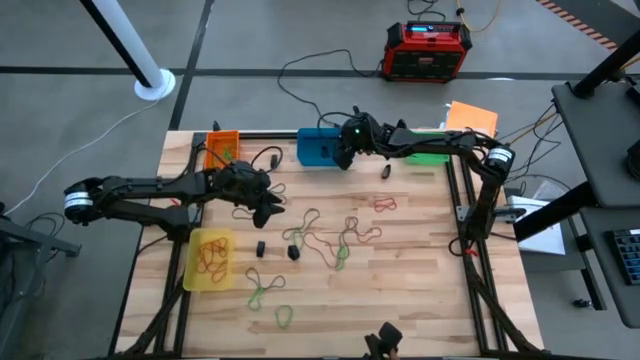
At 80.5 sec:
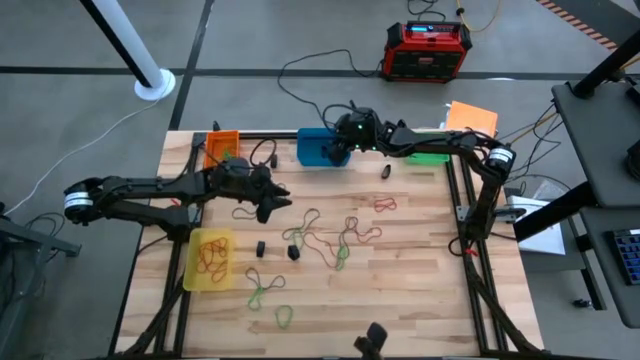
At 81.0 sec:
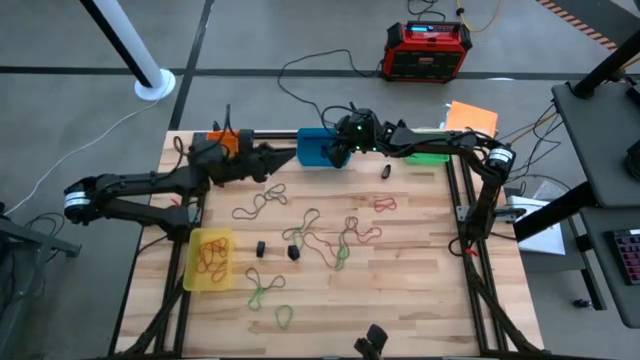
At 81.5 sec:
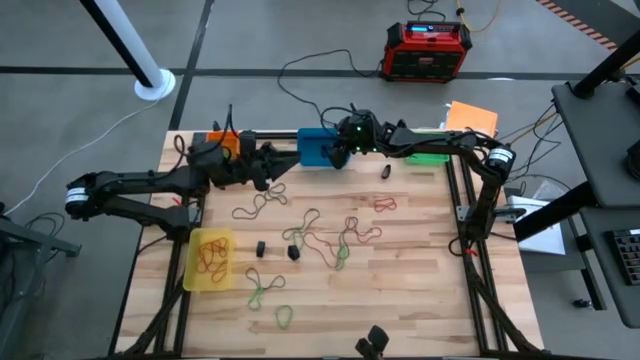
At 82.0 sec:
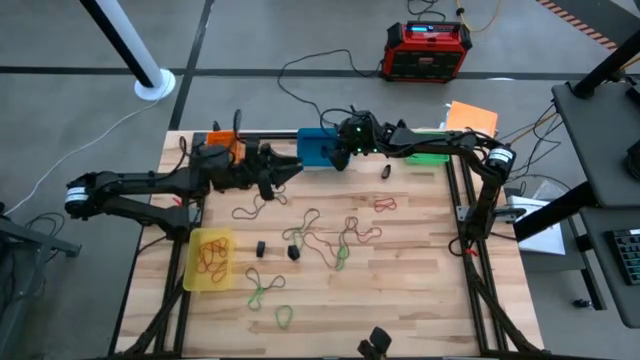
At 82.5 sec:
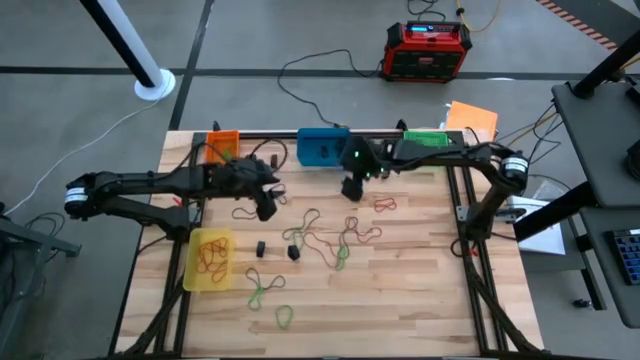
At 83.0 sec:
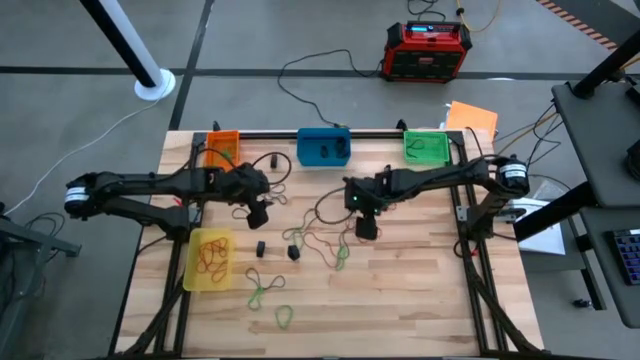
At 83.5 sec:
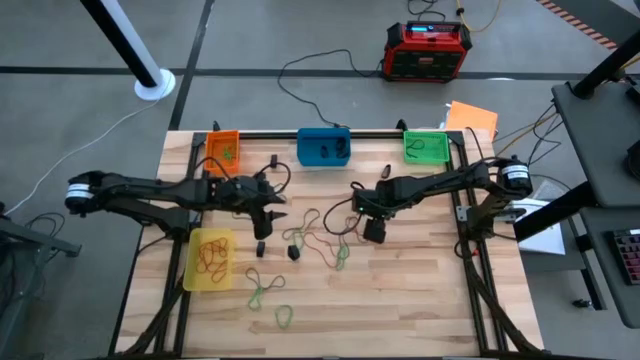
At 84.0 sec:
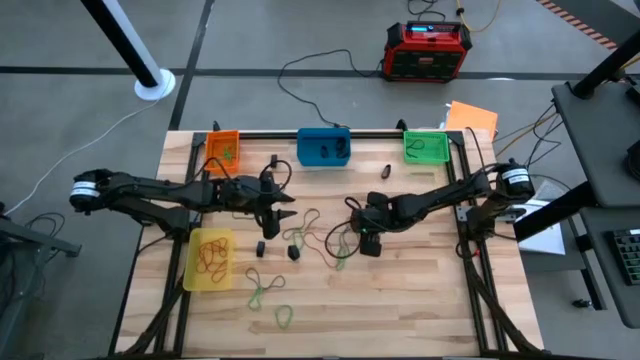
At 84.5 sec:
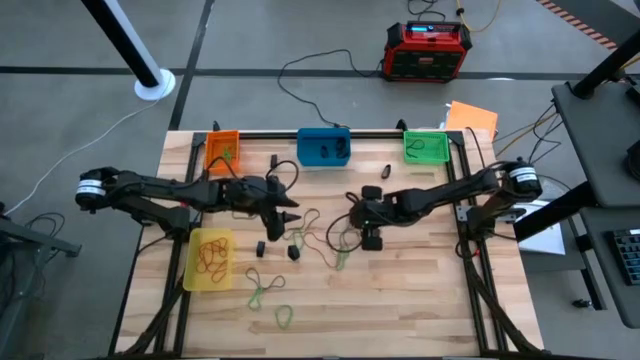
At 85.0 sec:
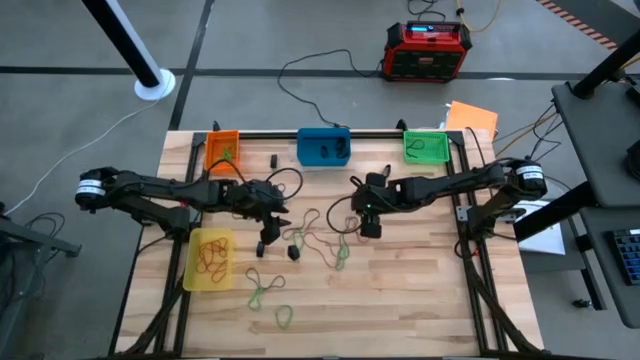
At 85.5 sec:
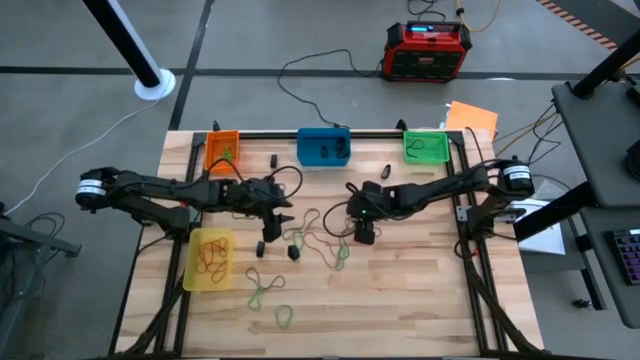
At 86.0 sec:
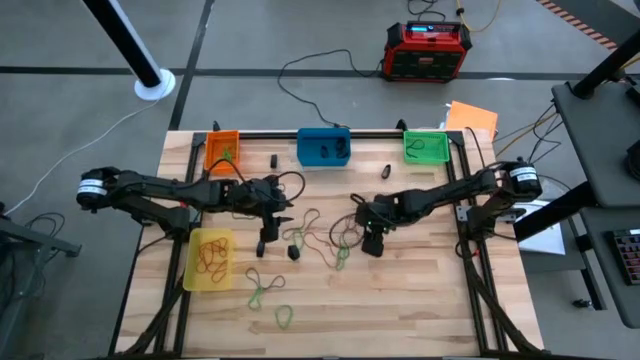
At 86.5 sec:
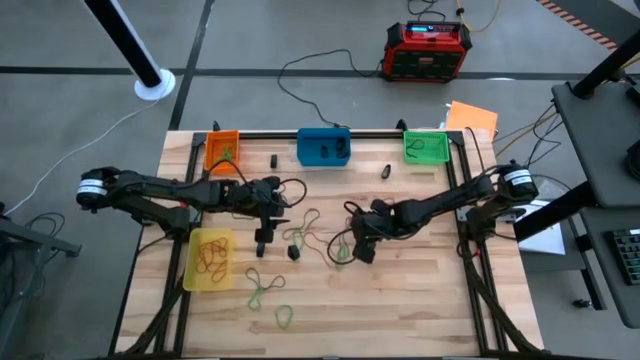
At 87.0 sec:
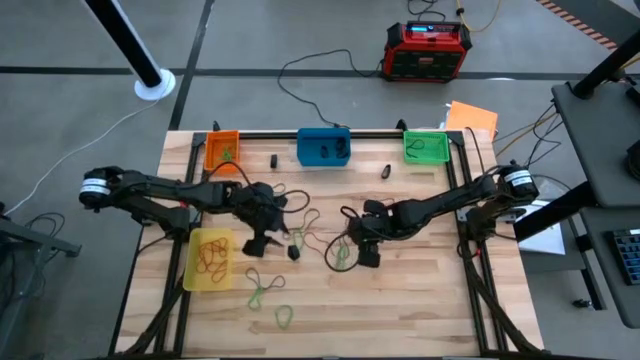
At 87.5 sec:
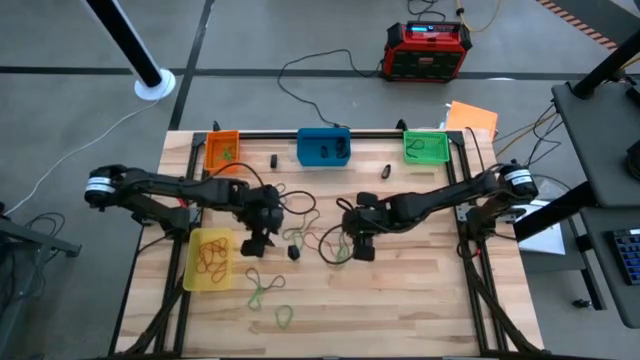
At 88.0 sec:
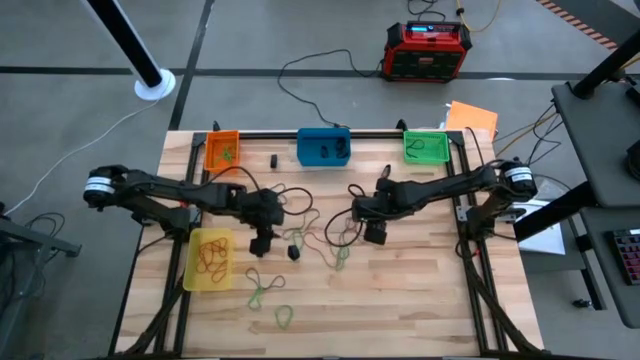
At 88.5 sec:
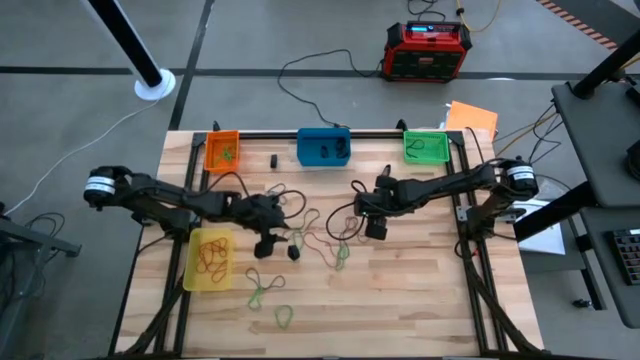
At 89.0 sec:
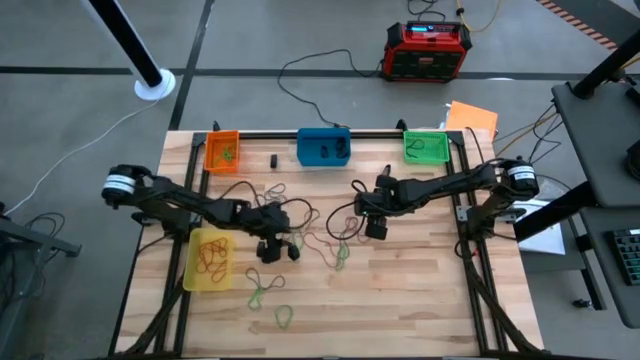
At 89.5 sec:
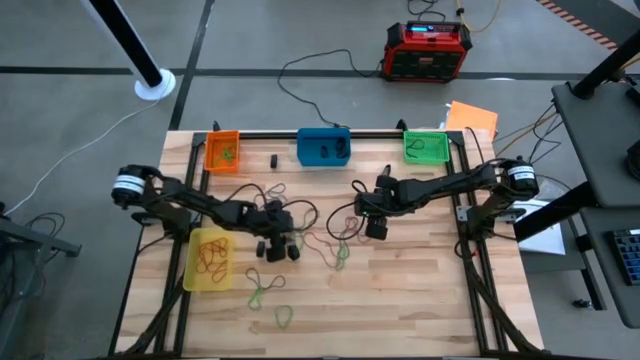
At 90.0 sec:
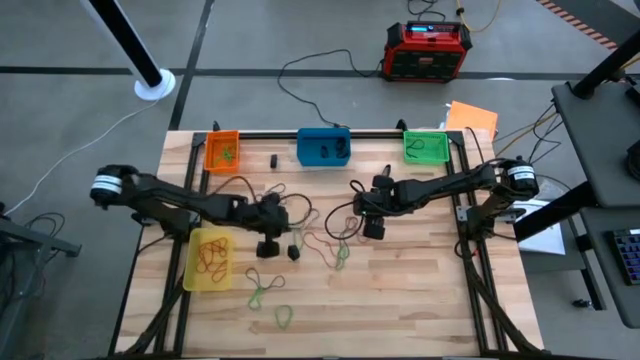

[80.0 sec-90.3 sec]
Task: Sort rubber bands into baskets
Put the violet rubber band into the green bin

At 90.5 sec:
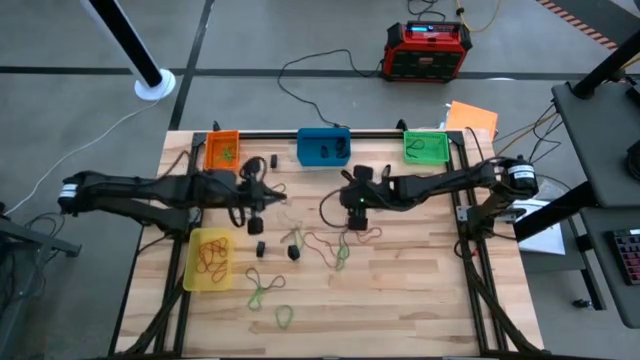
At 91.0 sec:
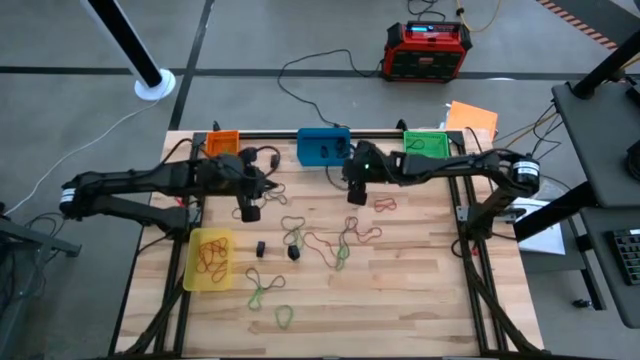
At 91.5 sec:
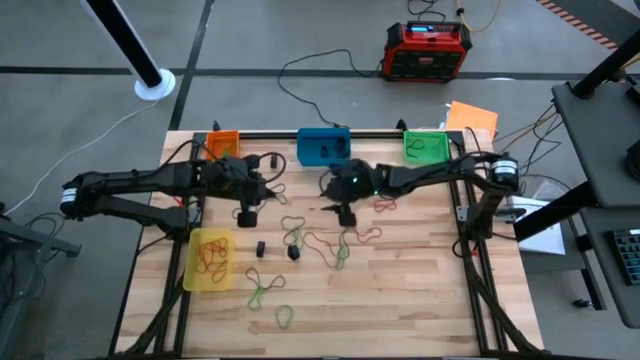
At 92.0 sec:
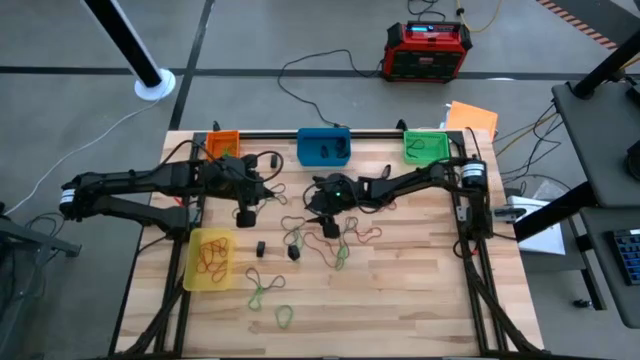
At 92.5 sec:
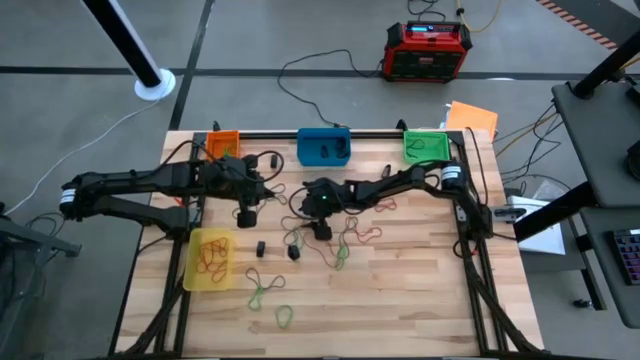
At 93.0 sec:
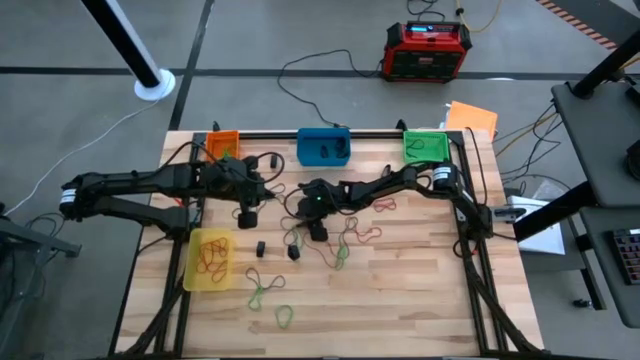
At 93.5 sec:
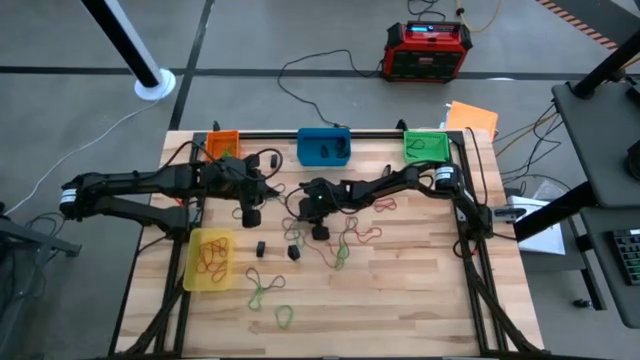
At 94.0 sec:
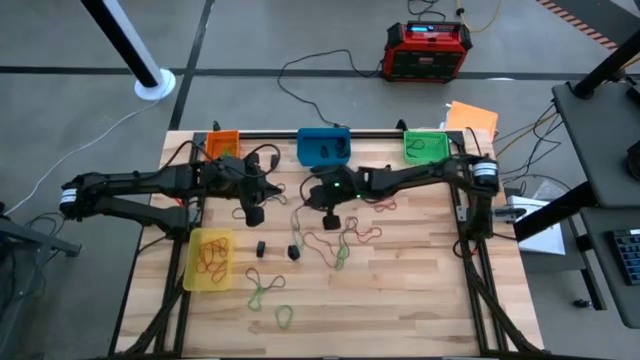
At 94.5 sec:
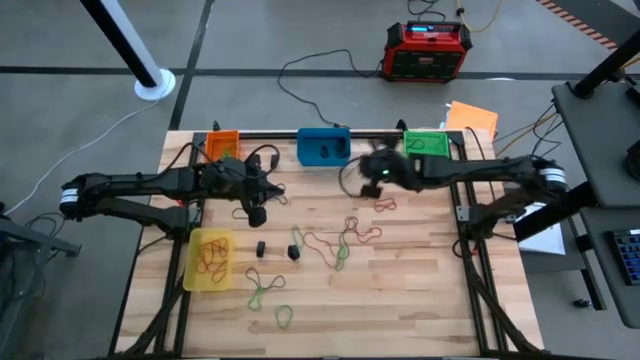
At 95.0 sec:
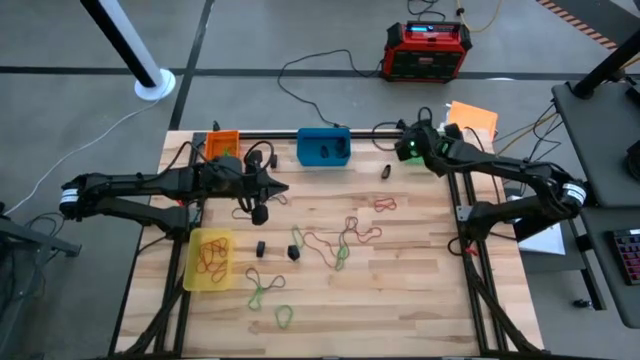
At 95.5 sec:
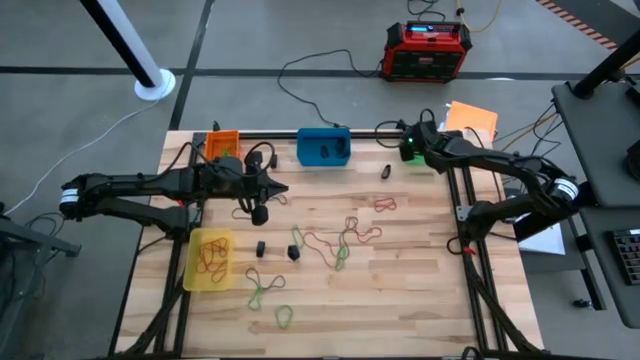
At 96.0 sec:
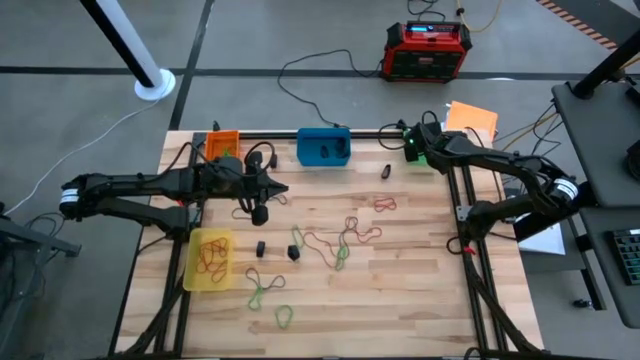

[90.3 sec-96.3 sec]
Put the violet rubber band into the green bin

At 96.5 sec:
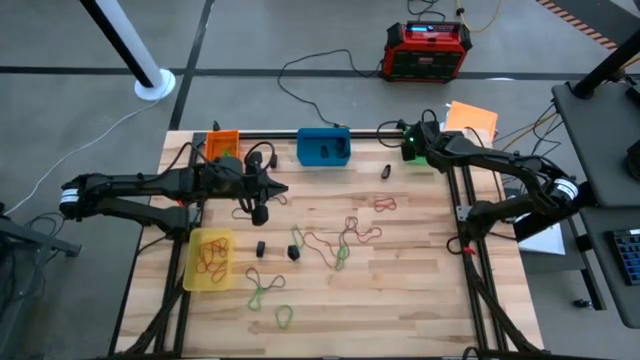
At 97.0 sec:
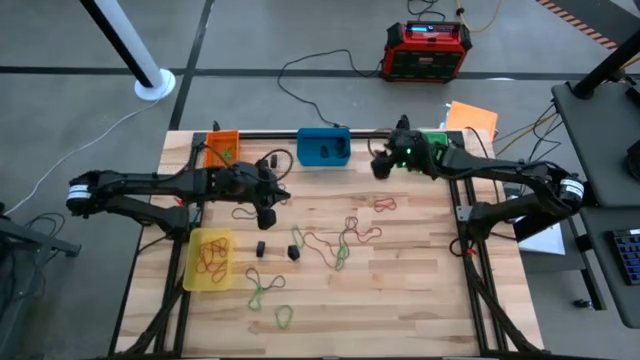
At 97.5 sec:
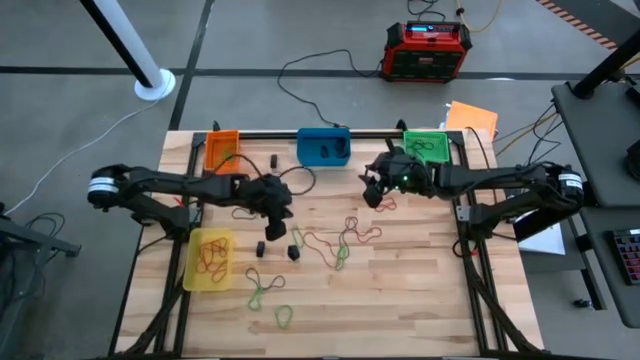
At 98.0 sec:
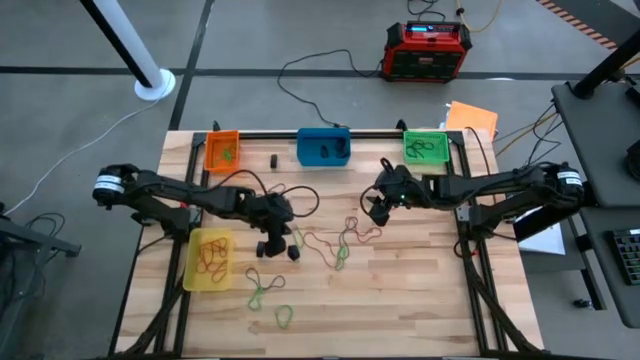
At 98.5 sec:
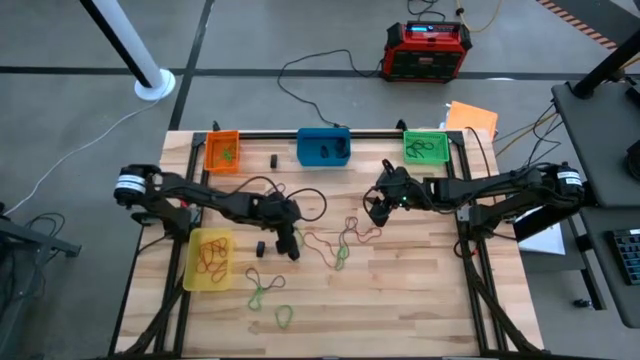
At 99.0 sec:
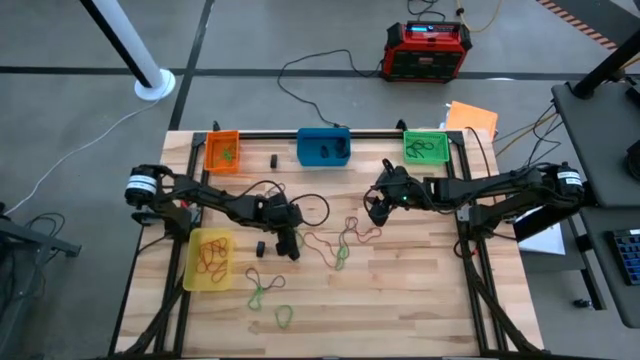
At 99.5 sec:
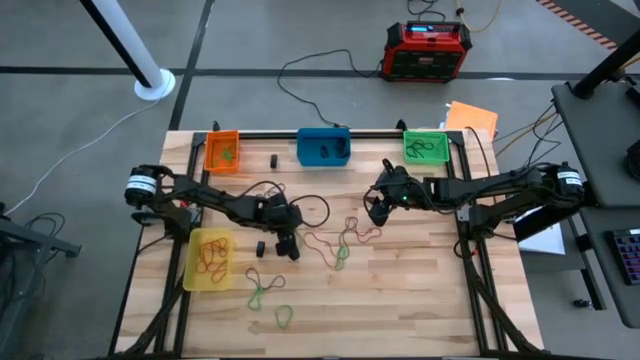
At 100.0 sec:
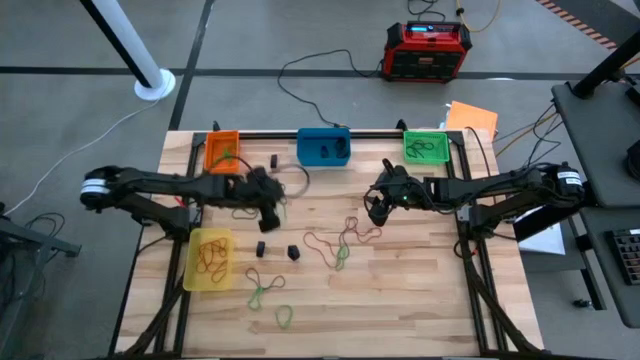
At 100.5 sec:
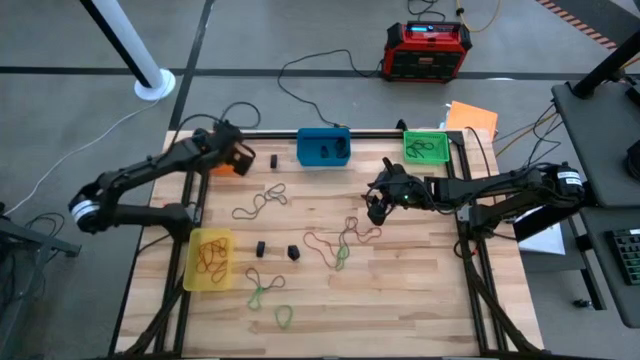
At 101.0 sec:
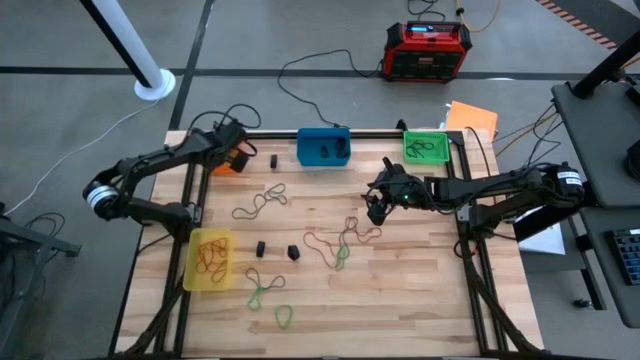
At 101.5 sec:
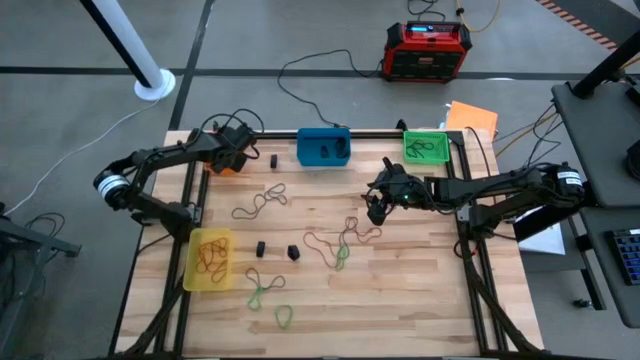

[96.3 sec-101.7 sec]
Put the green rubber band into the orange bin
